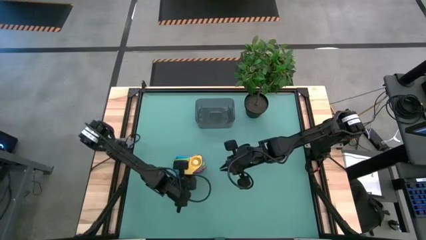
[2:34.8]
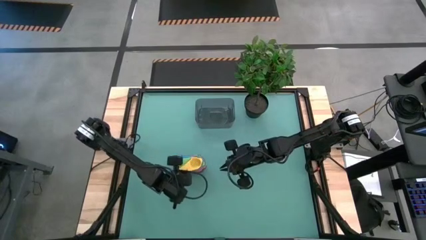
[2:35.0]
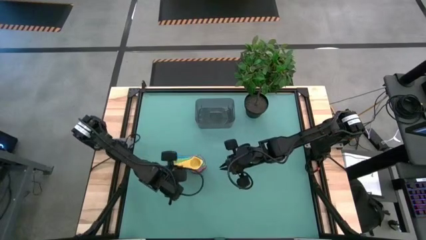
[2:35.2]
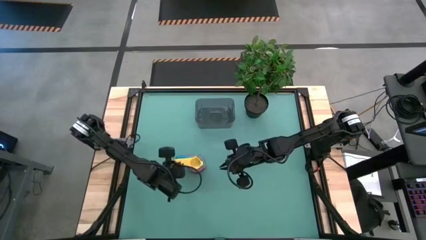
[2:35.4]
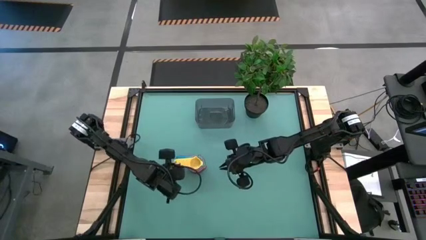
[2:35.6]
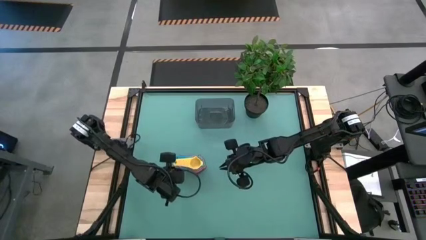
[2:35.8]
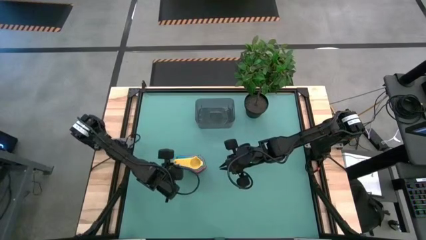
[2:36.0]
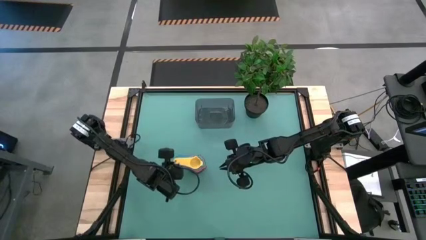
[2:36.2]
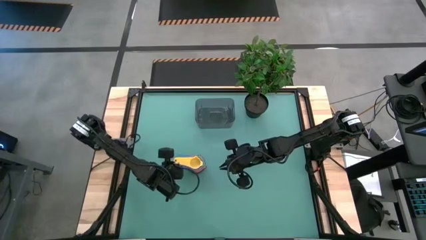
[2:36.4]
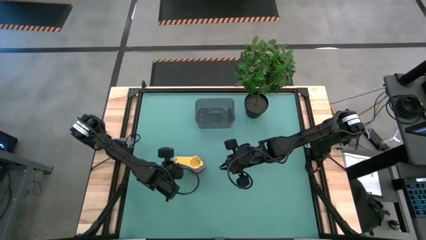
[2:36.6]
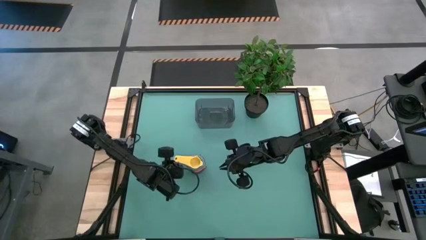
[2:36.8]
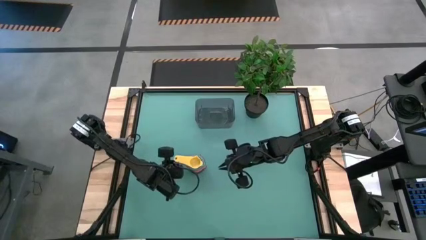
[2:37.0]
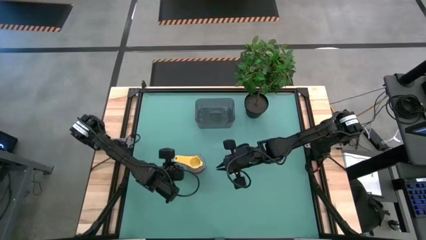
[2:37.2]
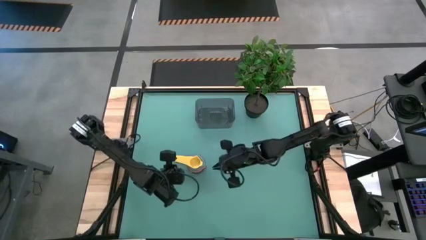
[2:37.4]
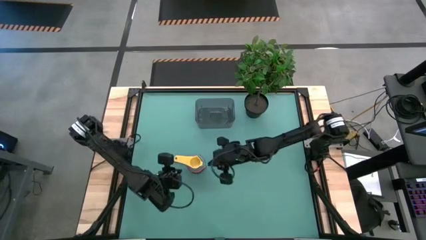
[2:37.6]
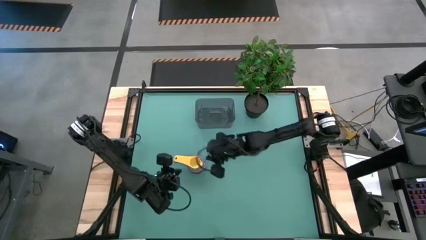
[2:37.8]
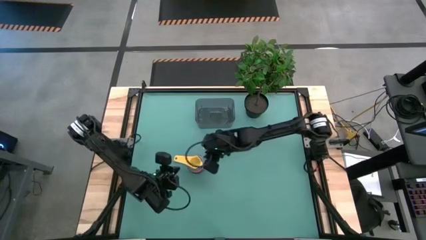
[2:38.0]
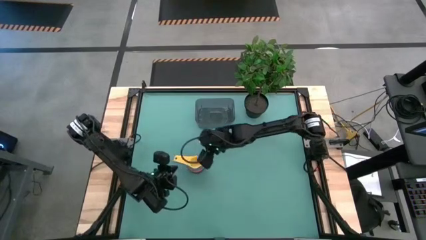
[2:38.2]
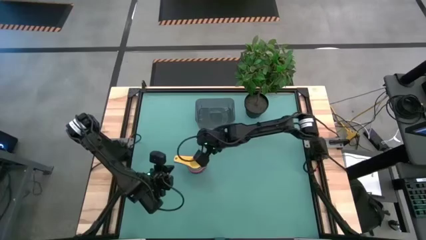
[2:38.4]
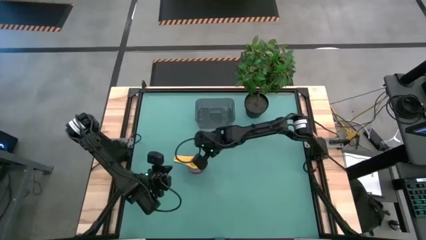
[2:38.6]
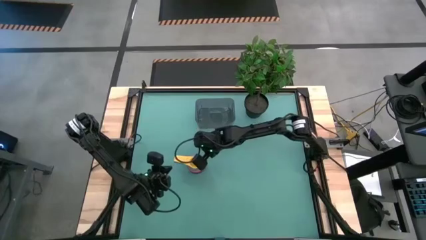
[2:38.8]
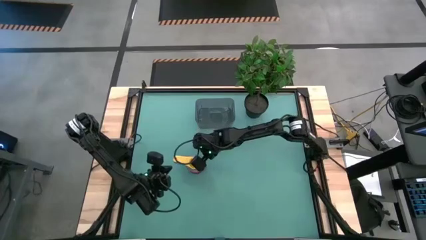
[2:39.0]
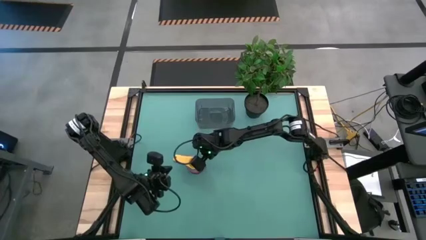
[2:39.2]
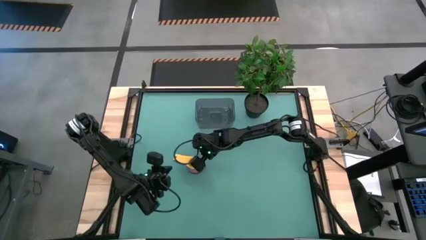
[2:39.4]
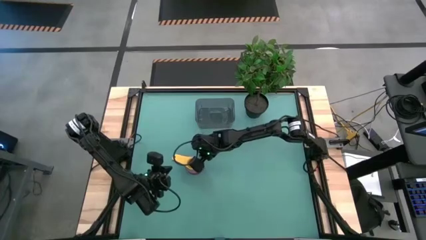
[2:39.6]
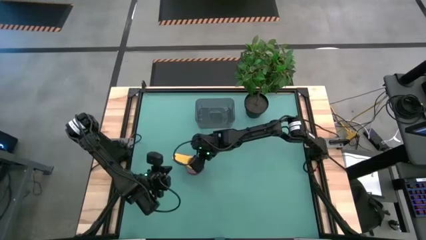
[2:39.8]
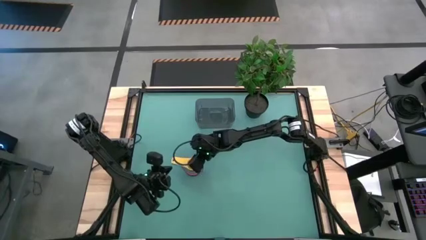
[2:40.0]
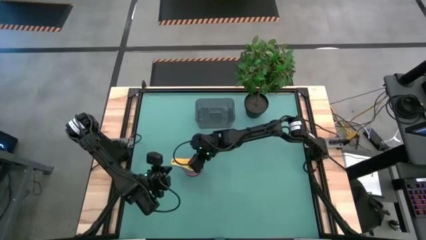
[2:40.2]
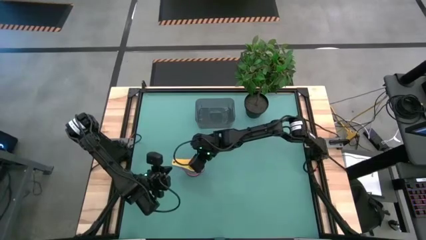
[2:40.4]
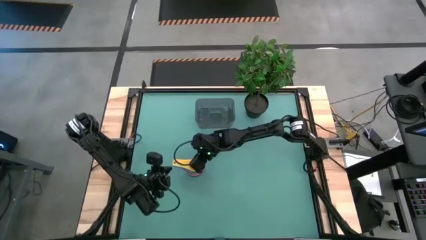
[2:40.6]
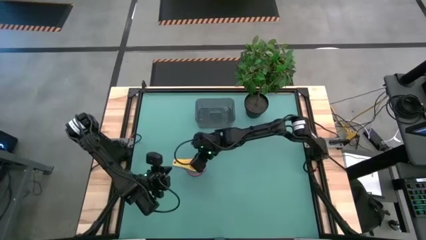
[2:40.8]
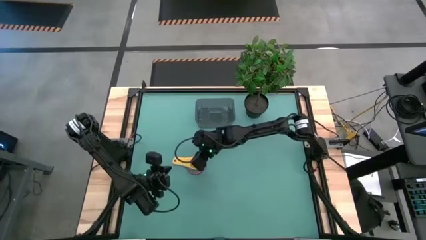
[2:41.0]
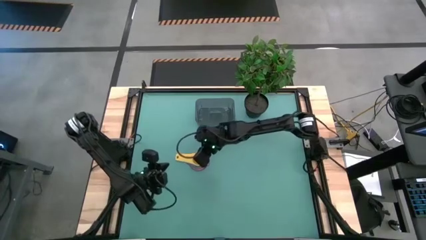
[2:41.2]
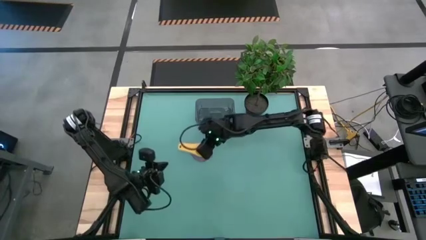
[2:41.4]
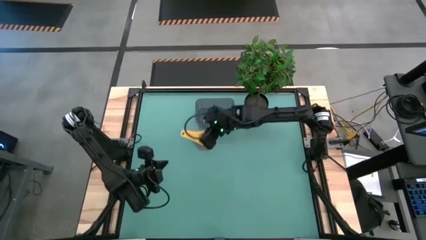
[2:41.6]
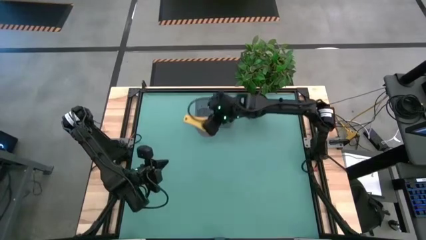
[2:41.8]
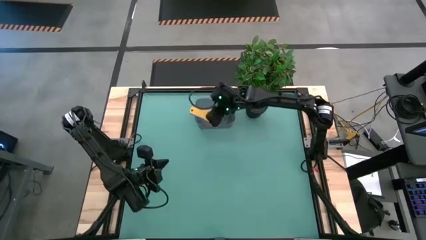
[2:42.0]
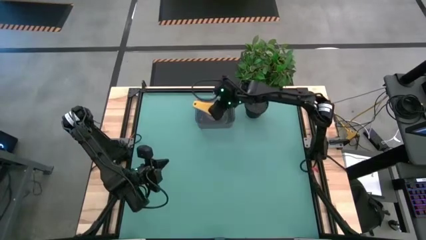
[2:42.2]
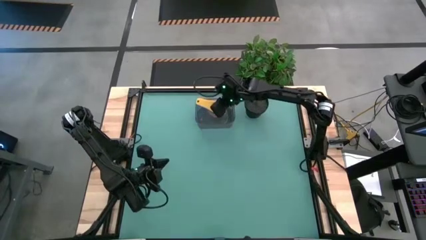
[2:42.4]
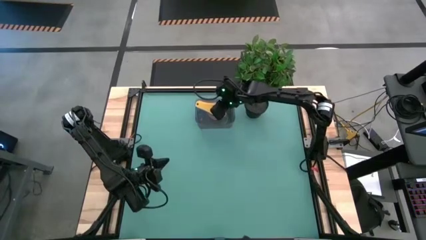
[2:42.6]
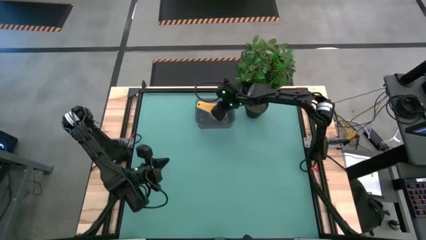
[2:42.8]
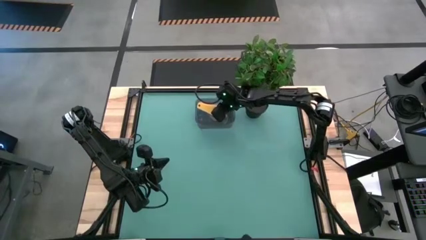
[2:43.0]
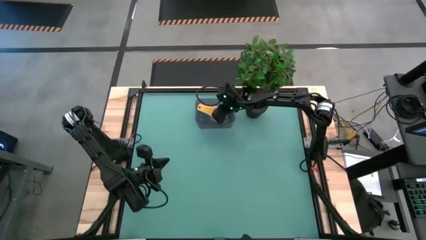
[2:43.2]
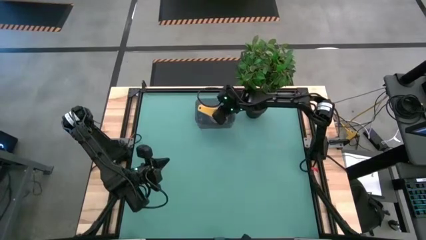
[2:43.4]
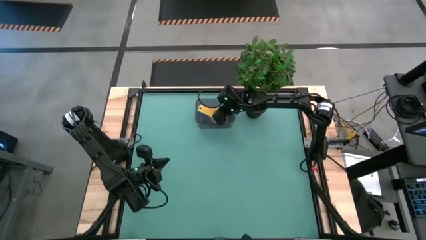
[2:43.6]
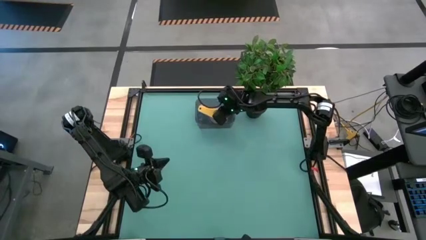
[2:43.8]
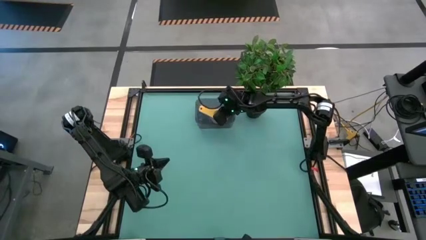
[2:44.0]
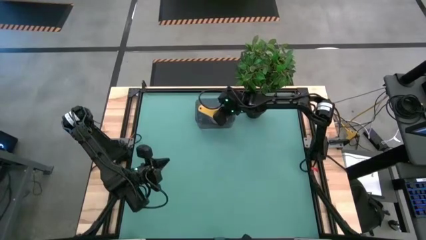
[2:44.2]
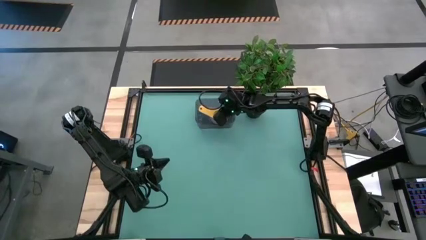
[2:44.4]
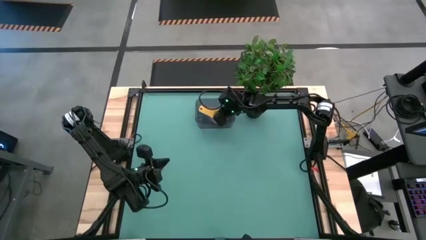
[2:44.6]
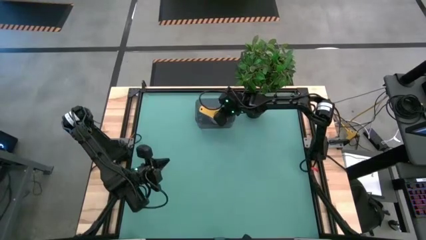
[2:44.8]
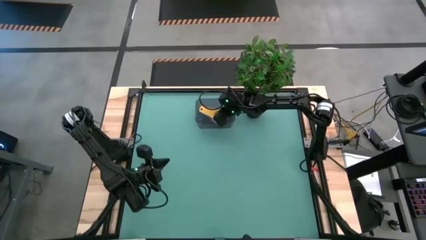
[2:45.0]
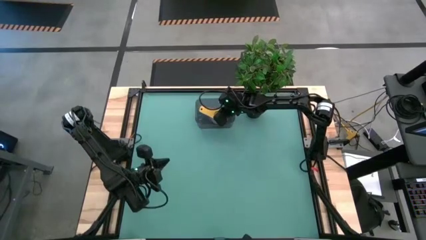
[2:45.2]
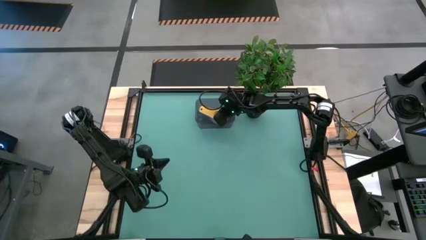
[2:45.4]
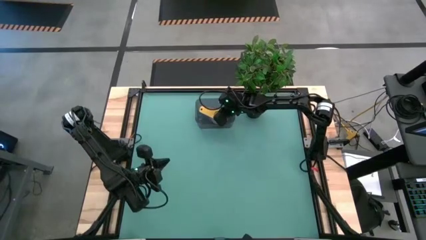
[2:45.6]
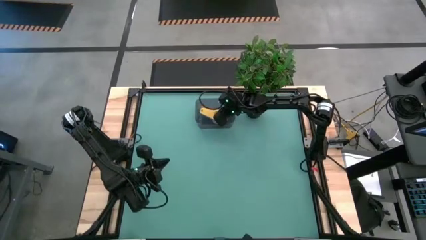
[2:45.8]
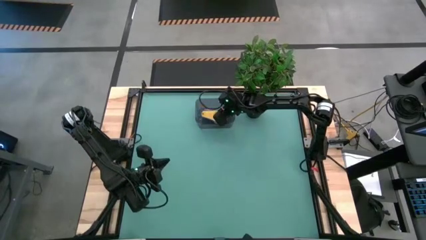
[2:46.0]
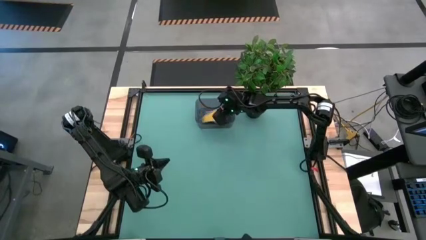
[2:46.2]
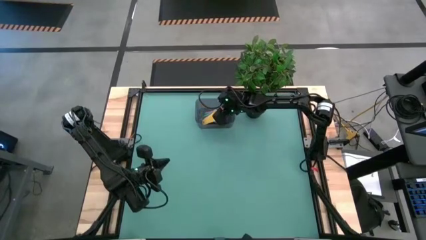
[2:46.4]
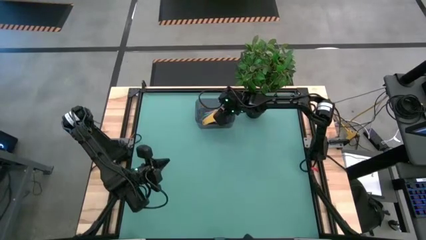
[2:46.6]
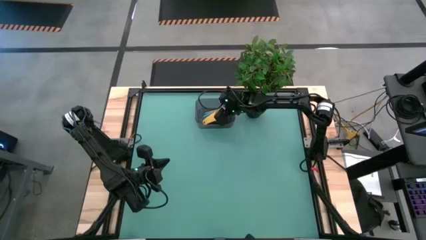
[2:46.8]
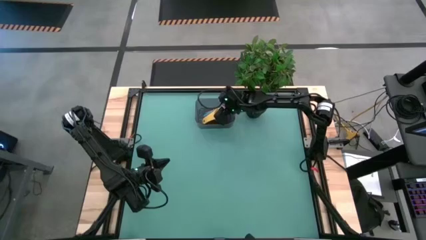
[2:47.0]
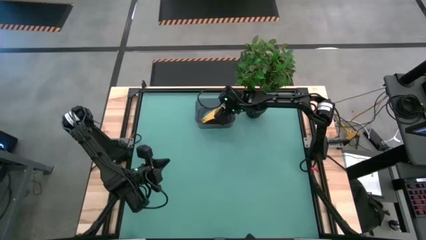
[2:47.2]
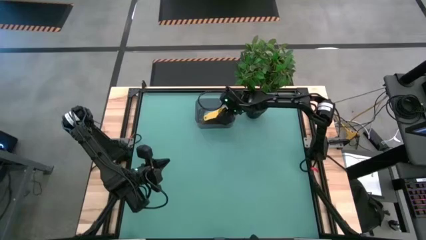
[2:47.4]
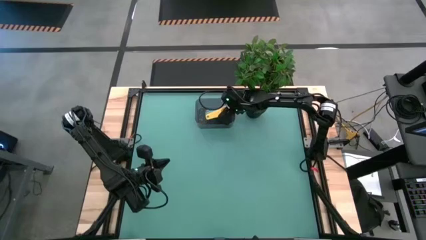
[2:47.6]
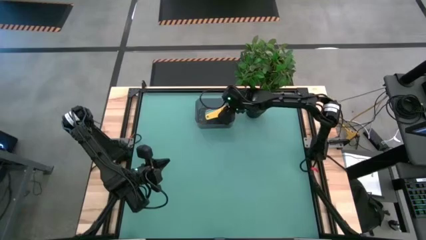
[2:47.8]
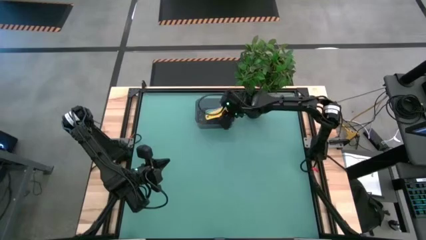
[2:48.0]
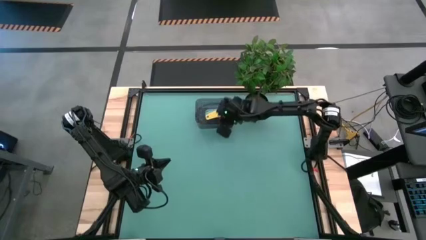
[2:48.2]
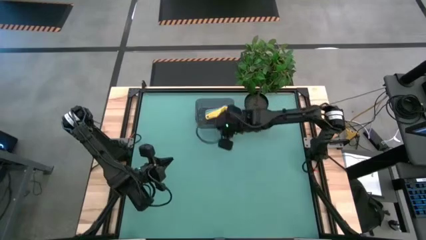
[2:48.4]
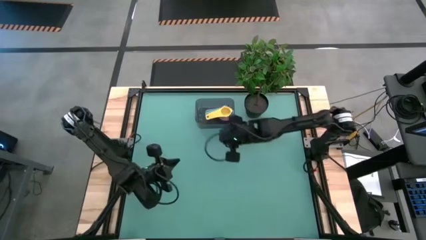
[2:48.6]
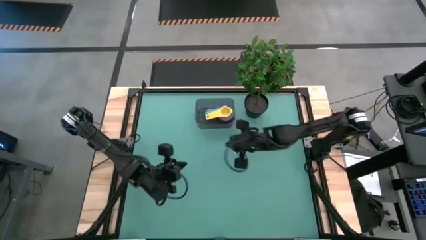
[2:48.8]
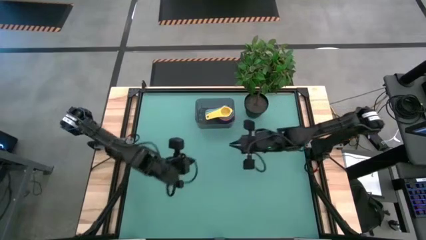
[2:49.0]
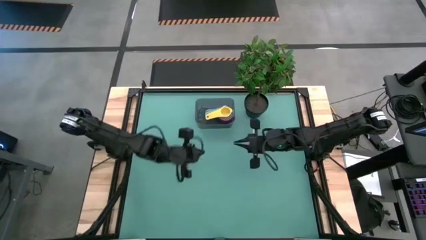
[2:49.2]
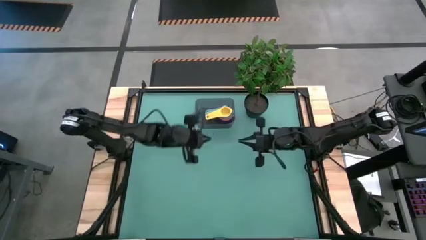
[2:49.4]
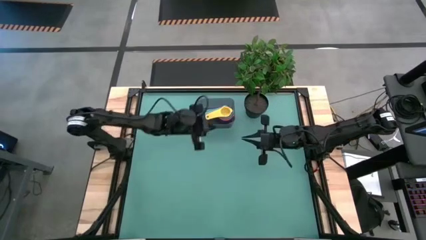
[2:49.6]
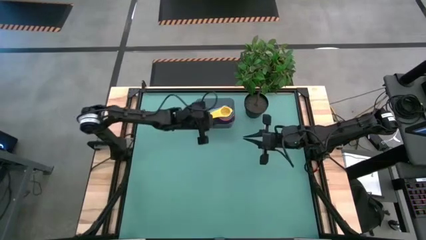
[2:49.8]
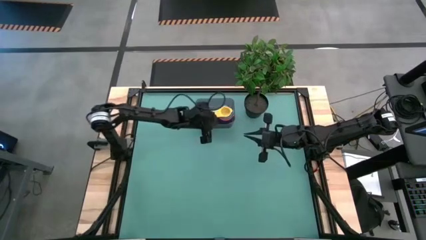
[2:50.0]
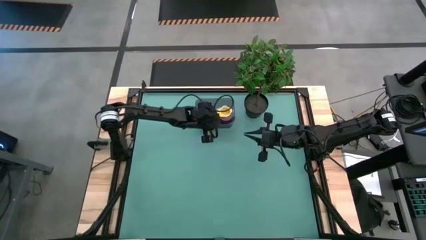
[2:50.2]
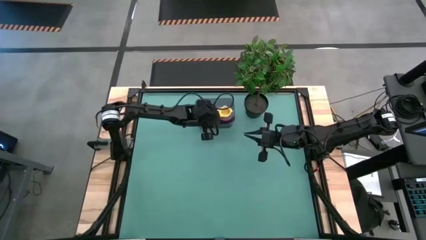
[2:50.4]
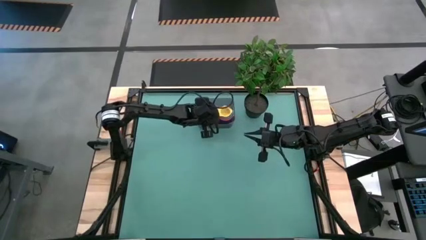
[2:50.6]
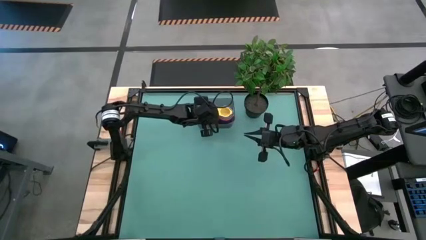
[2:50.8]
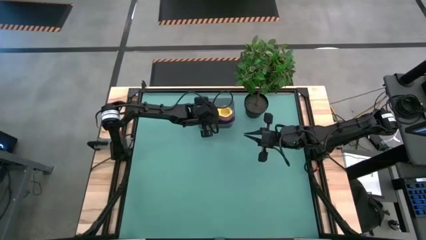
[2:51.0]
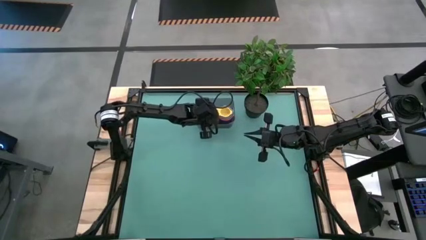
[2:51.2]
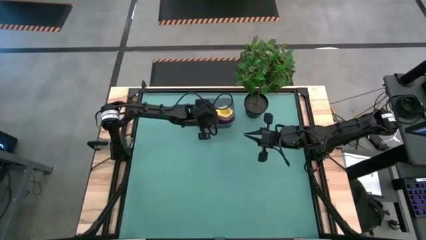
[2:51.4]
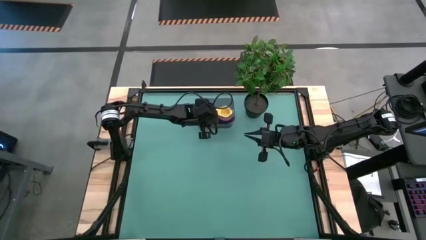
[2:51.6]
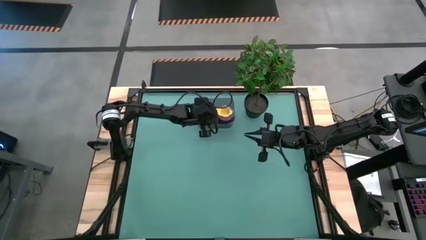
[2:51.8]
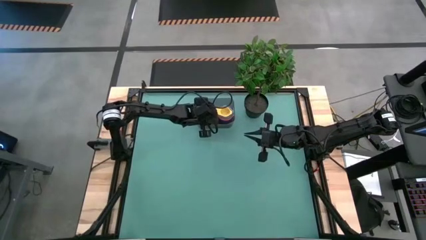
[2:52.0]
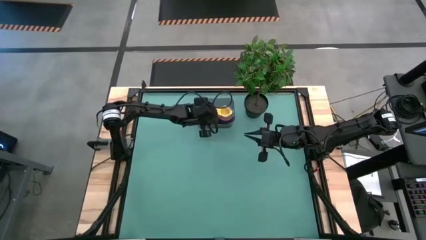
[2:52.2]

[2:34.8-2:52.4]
Task: Nest measuring cups in basket
Put the measuring cup into the bin
